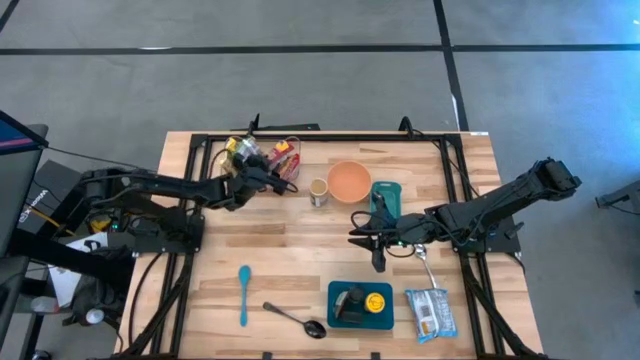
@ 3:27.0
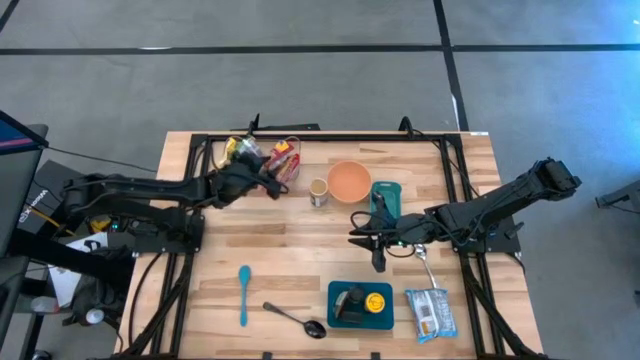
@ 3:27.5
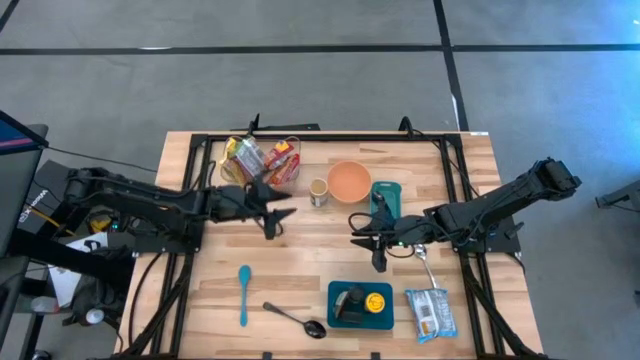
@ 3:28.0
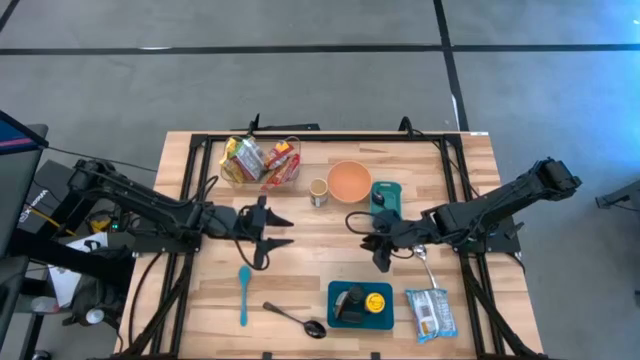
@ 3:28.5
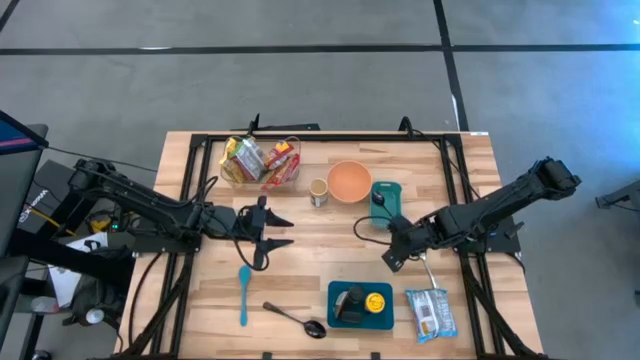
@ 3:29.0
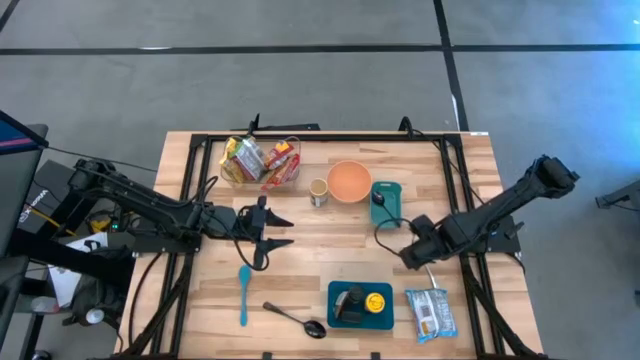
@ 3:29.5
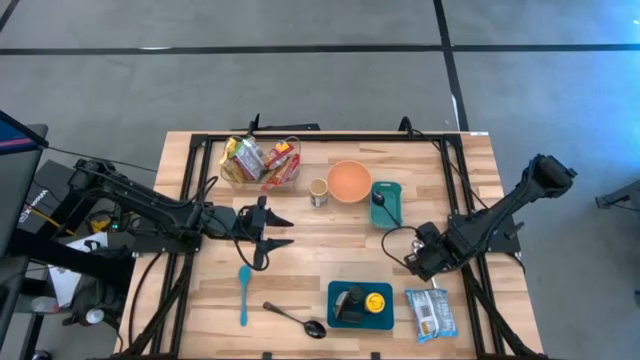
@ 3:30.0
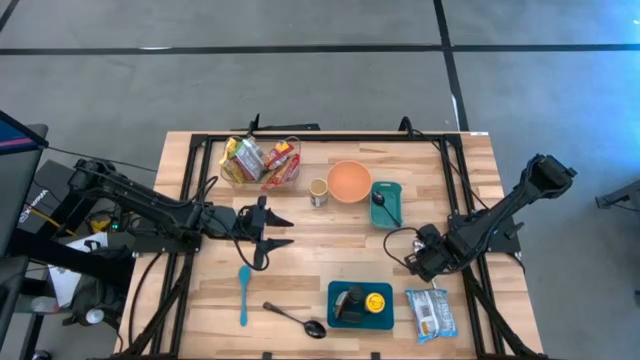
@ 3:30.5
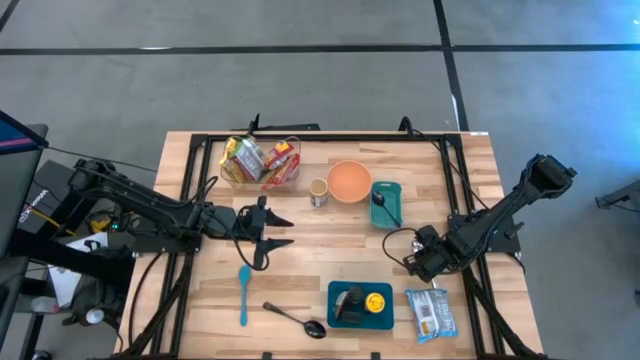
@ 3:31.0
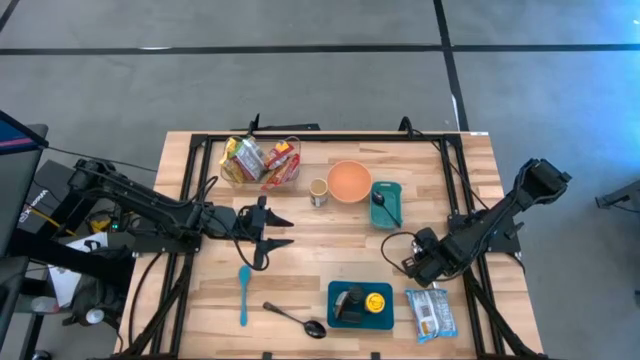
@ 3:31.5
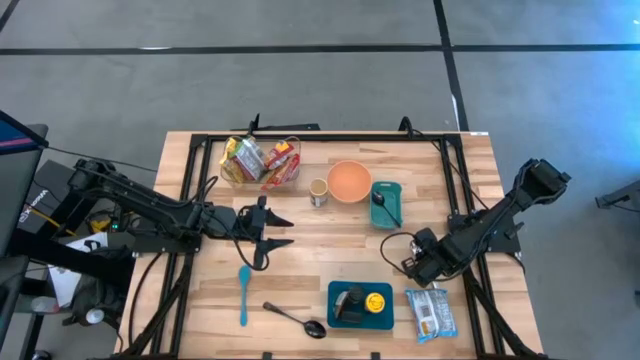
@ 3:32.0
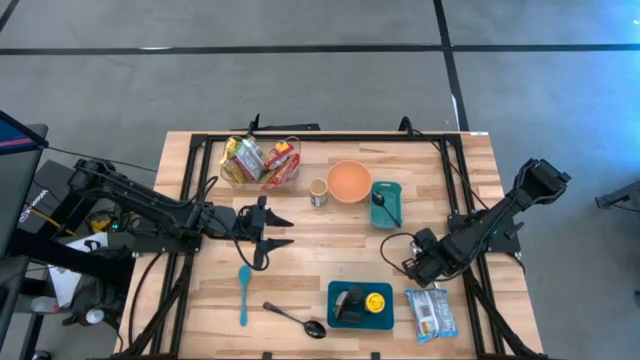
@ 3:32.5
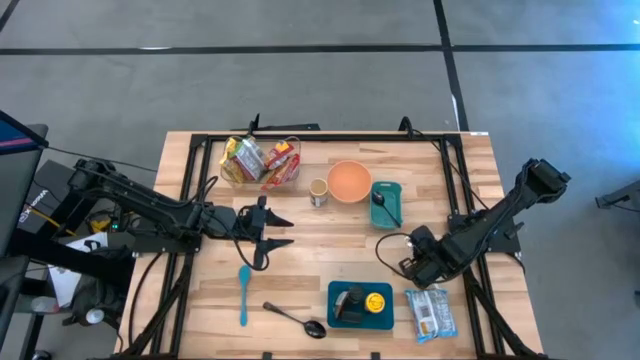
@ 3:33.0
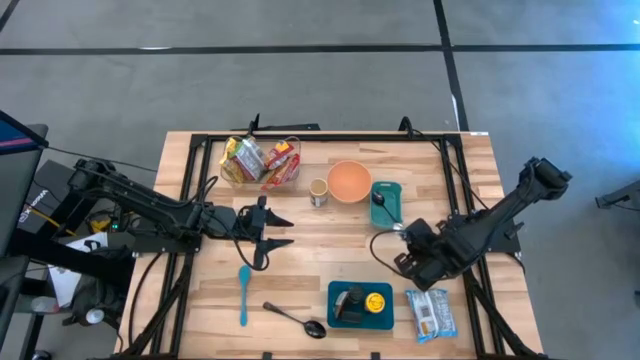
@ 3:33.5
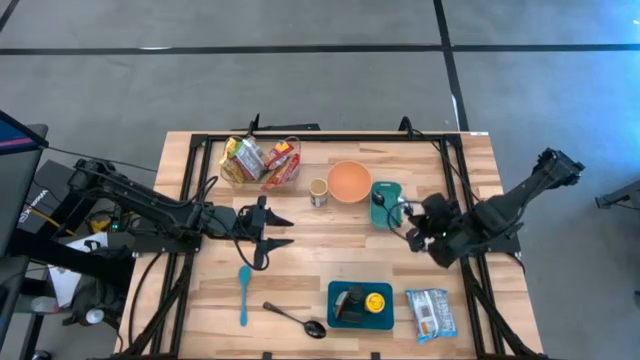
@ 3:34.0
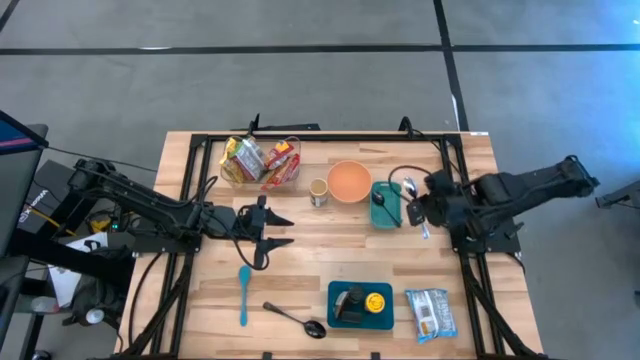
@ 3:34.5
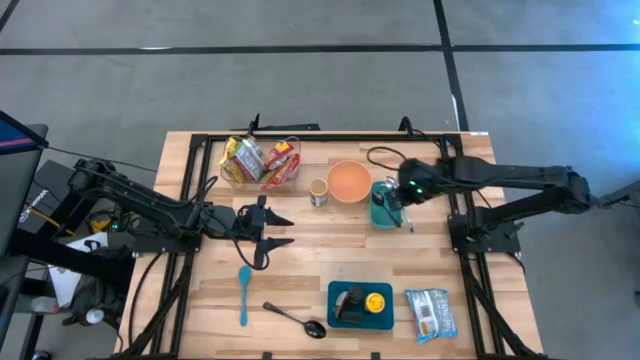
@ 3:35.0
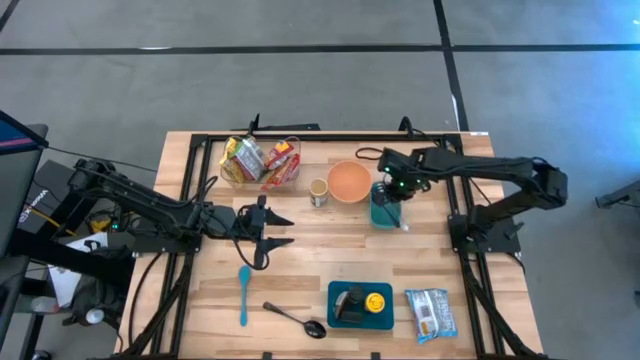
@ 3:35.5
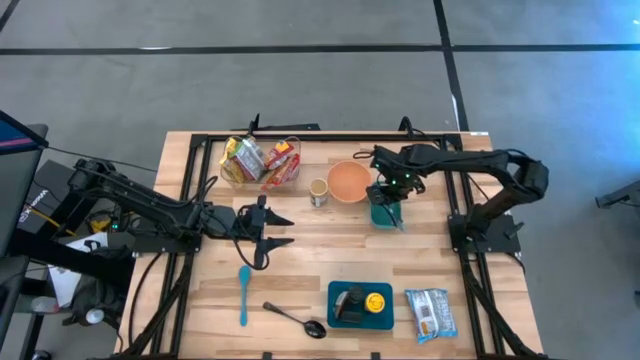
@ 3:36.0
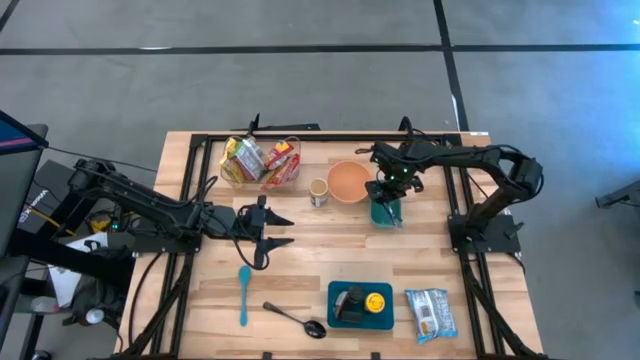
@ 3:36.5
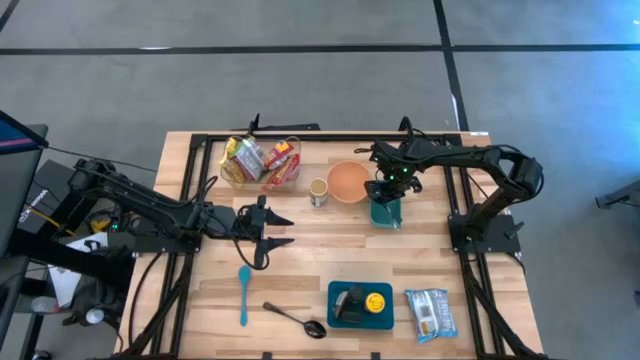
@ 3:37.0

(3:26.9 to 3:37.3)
Task: Pick & Place Food Item
Put the silver spoon into the green bin

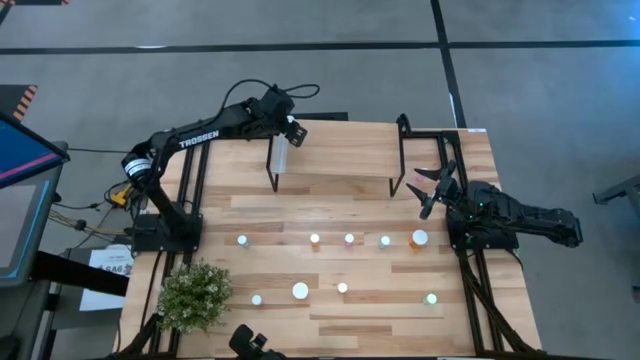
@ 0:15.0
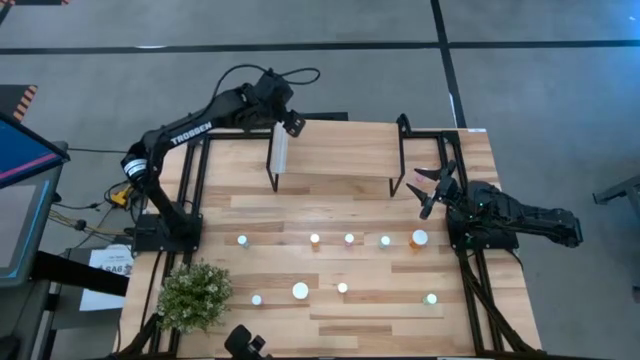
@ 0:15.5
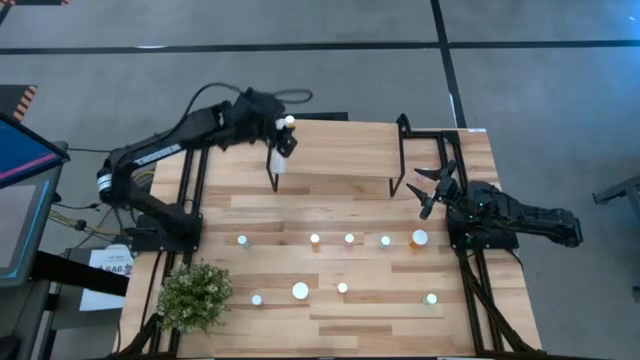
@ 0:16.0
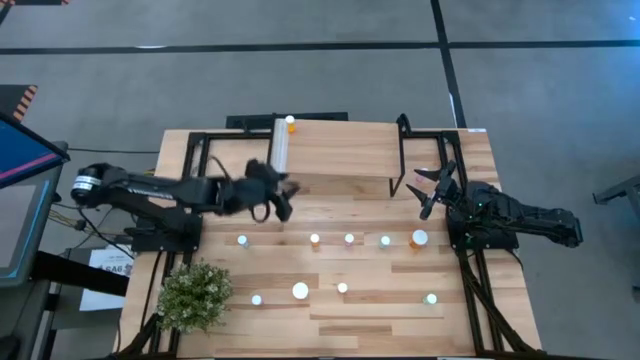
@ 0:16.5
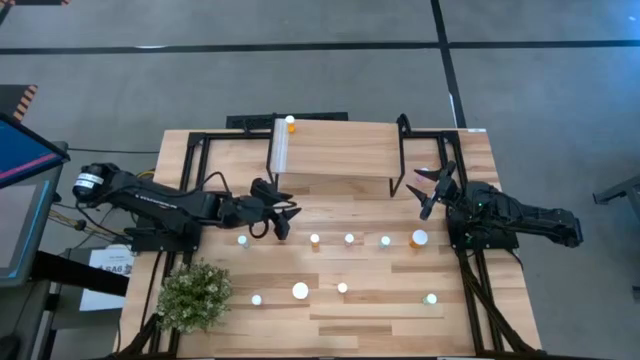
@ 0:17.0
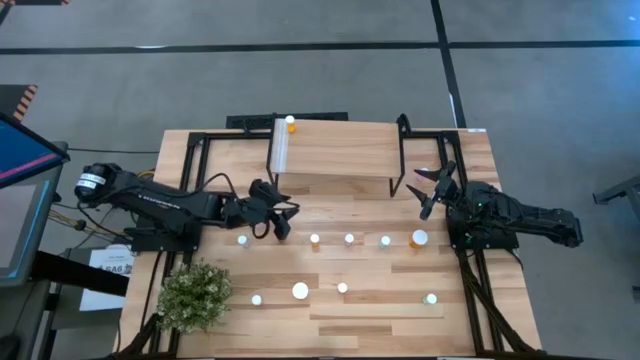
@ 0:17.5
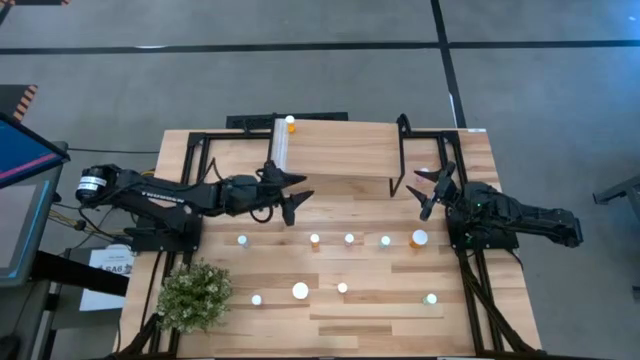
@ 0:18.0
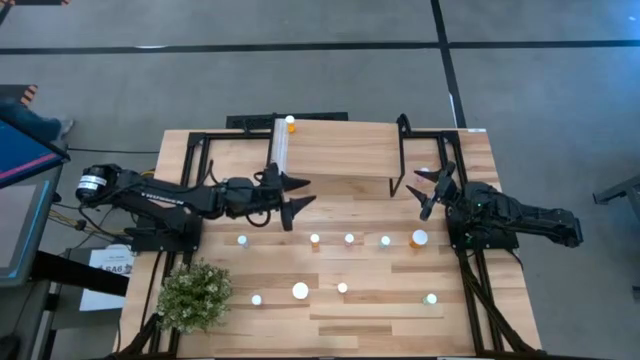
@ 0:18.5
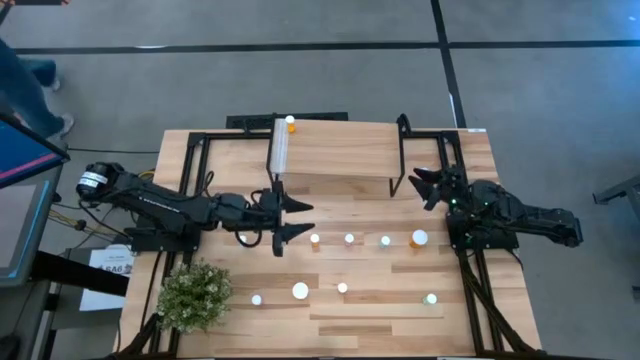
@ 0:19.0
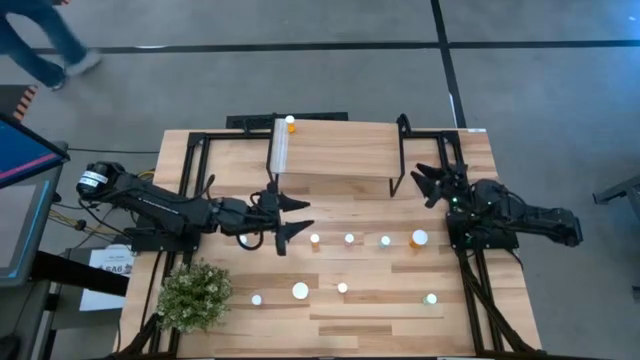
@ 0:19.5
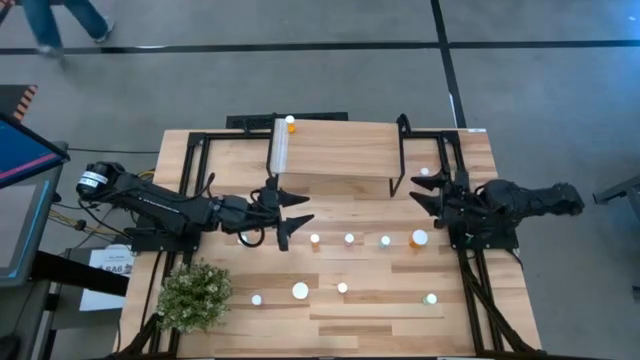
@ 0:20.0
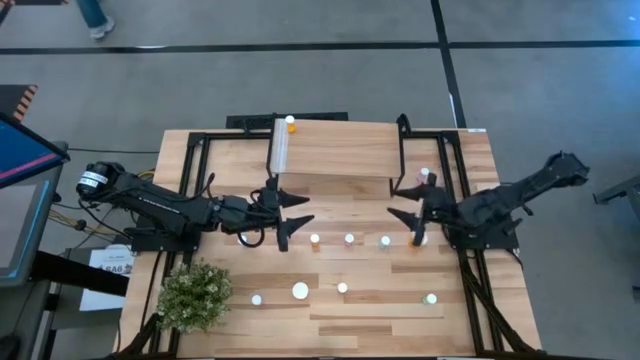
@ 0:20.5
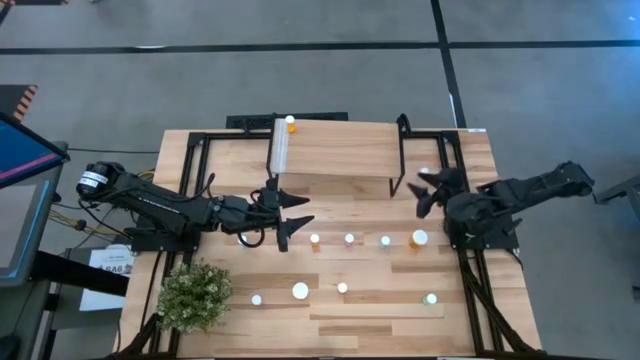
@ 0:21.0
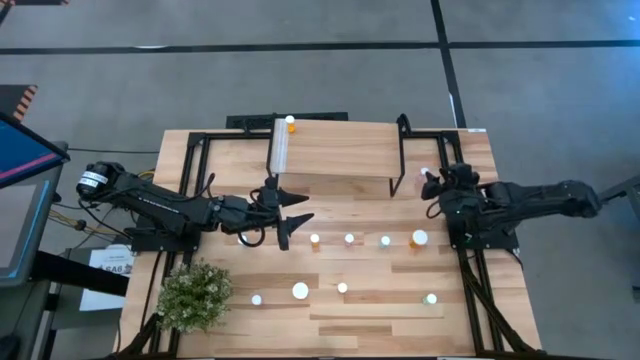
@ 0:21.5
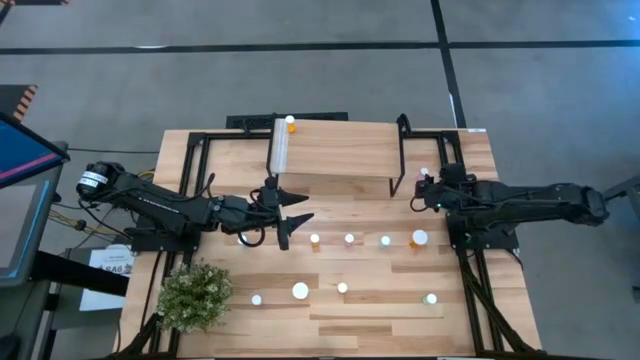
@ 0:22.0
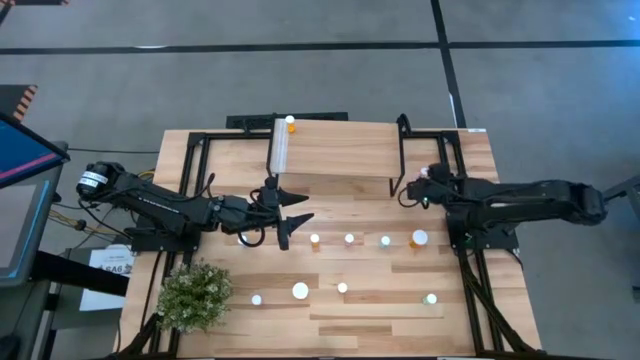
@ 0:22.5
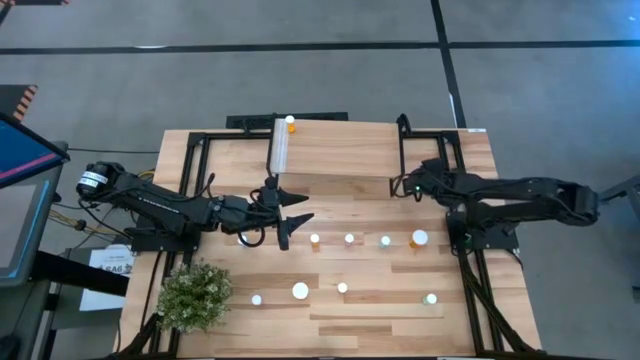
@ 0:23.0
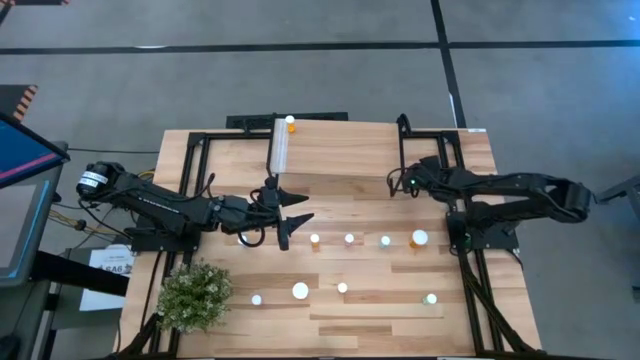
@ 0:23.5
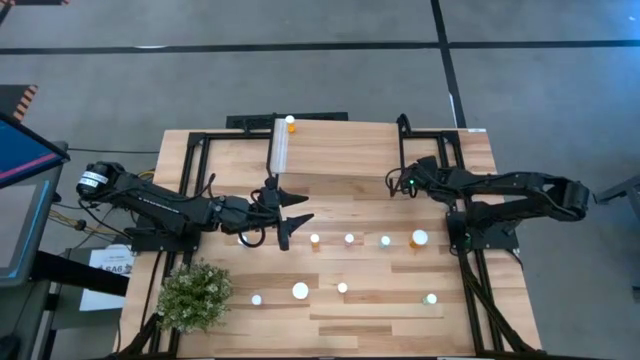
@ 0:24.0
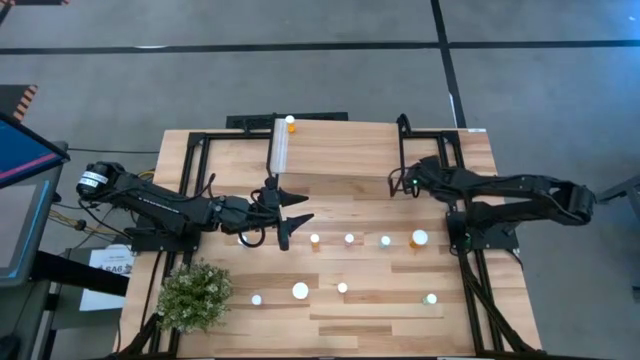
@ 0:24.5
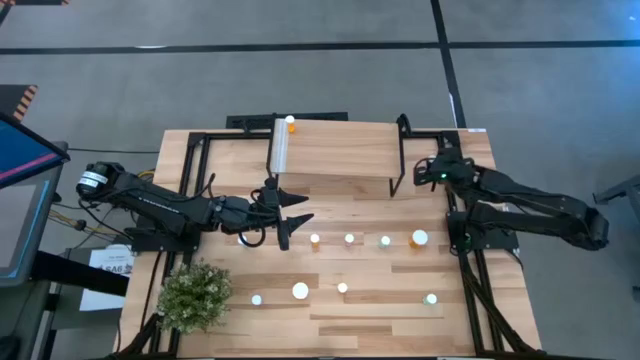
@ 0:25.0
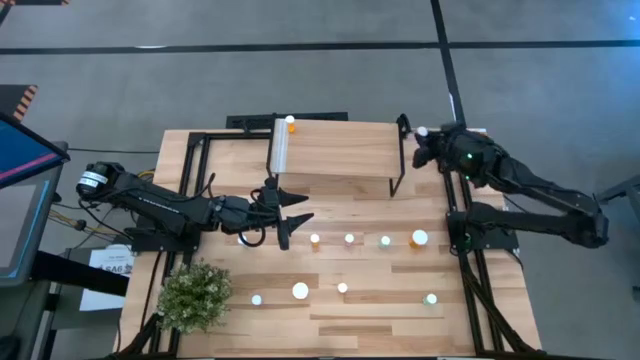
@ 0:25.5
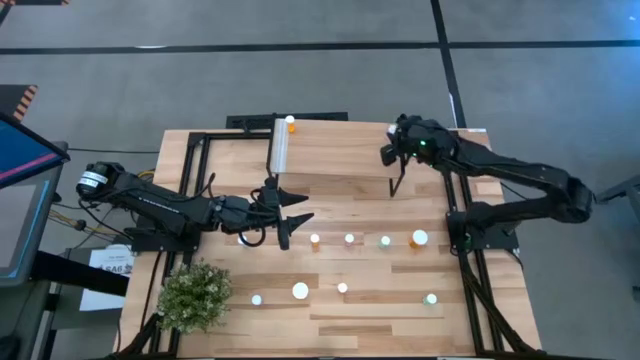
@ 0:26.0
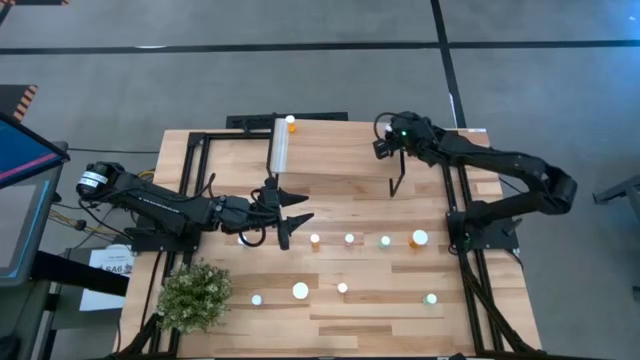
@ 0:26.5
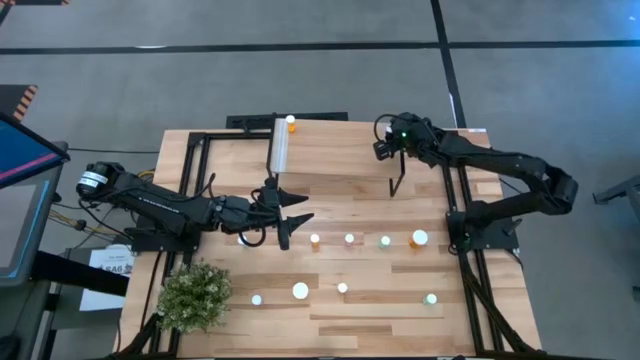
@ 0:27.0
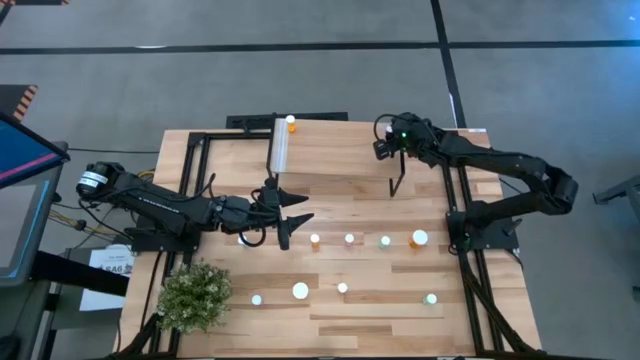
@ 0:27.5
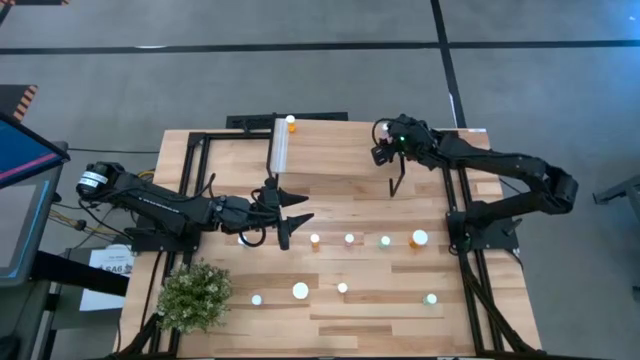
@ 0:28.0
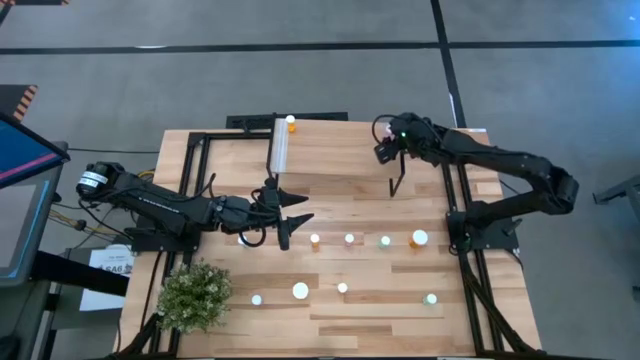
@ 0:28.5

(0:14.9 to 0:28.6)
Task: Pick and place medicine bottles onto shelf by color
Put the top small pink pill bottle on the shelf
